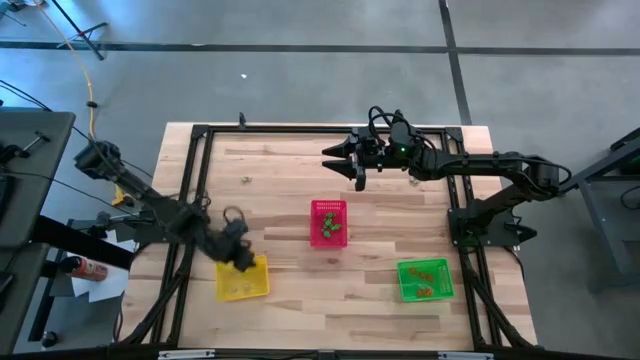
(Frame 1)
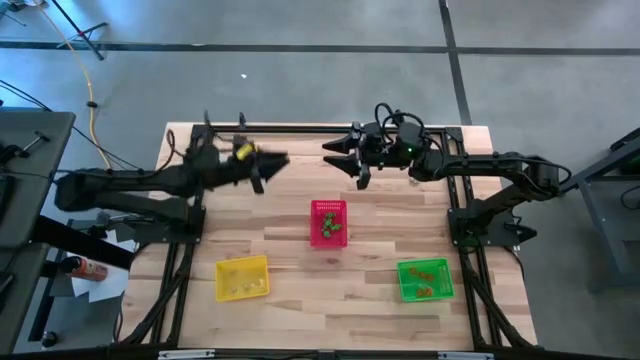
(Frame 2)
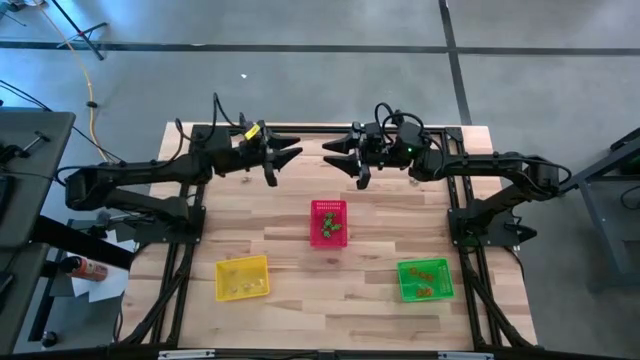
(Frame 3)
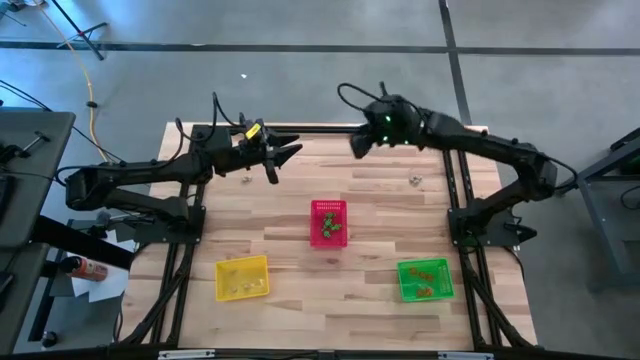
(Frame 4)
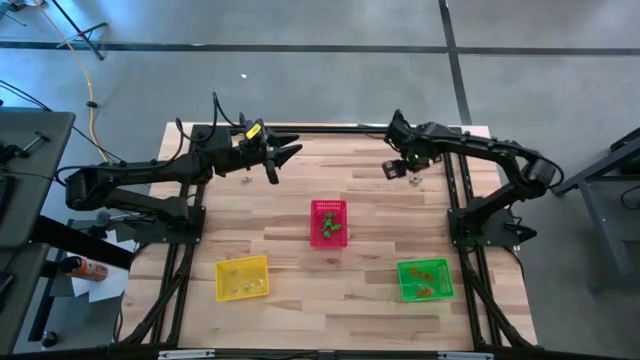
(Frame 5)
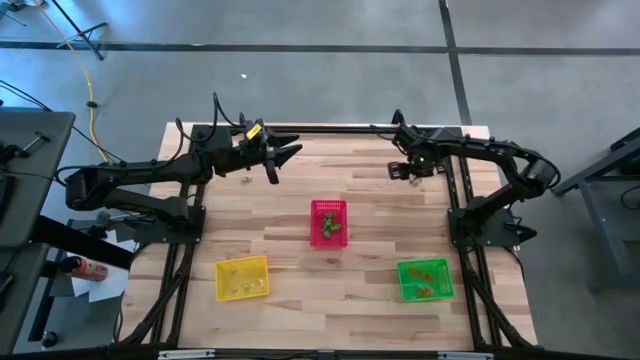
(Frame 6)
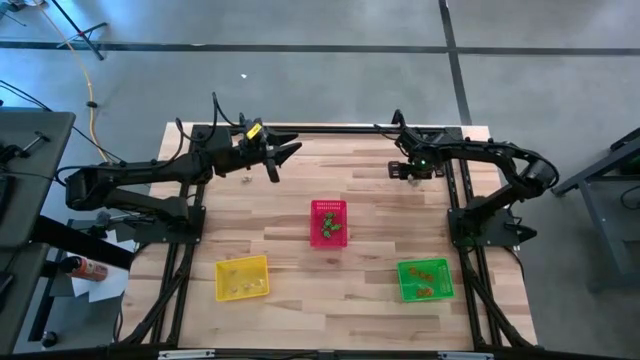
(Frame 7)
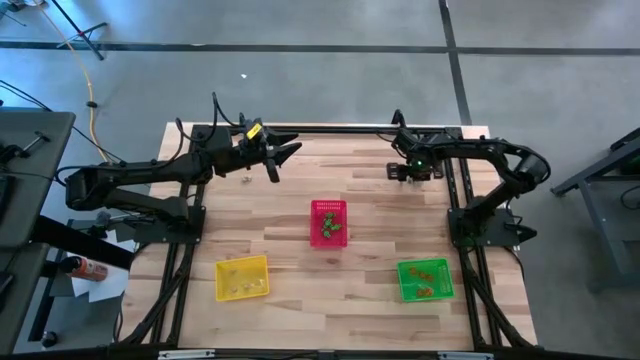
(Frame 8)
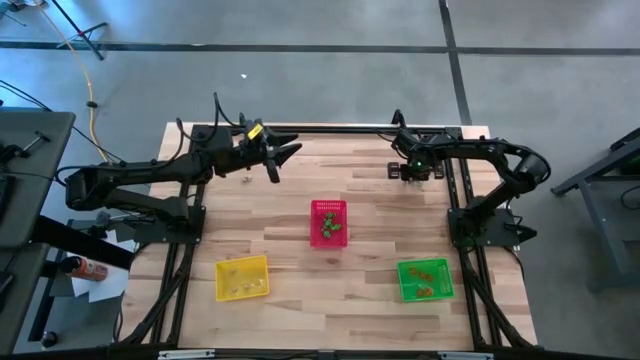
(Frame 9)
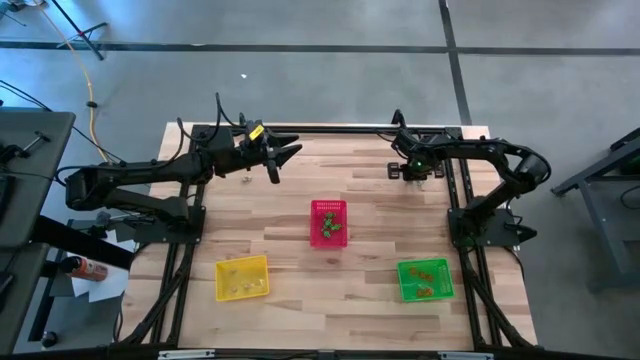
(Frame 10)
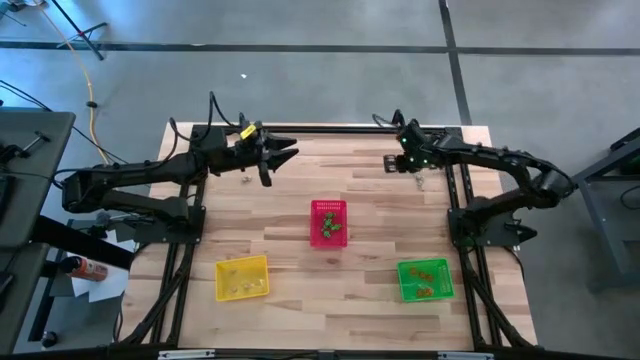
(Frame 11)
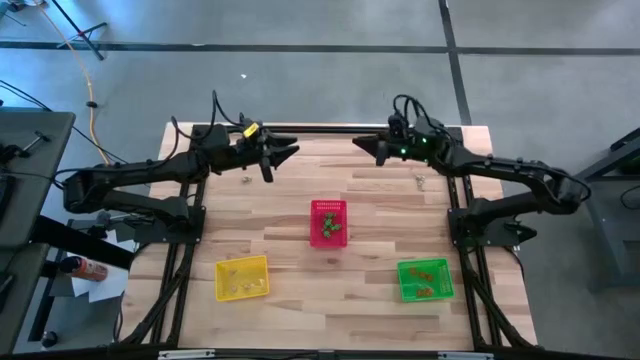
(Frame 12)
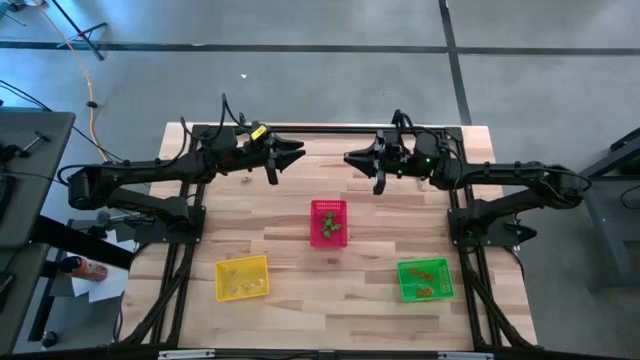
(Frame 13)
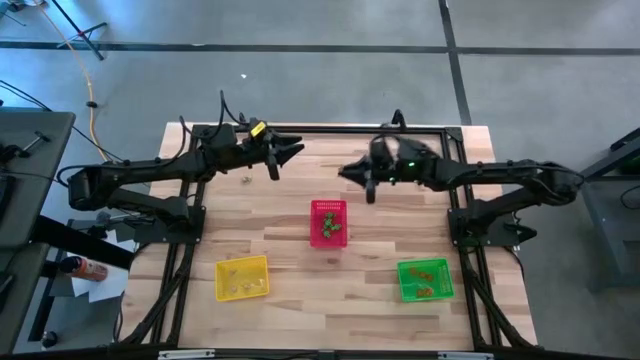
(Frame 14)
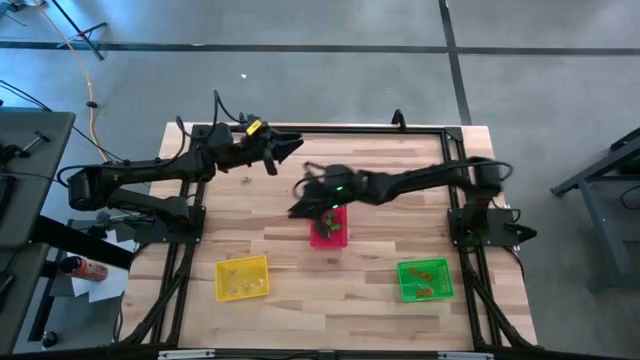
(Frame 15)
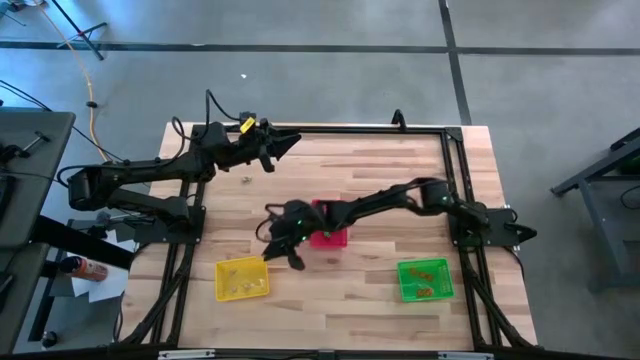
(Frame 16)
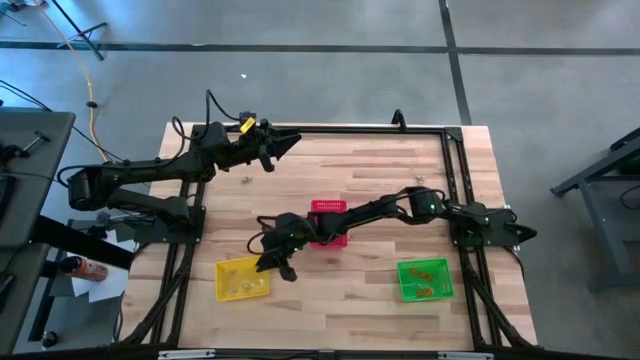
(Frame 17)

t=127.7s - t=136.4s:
Task: Sort Halloween decoration
Put the white skull toy into the yellow bin

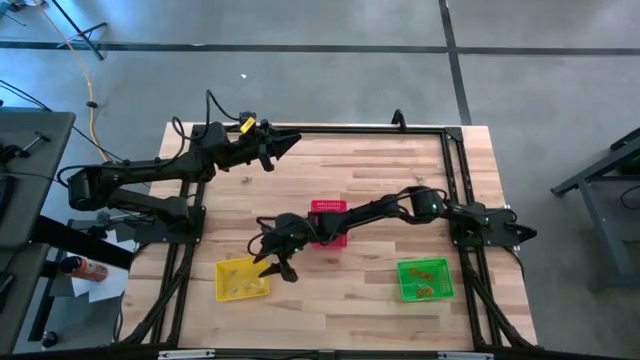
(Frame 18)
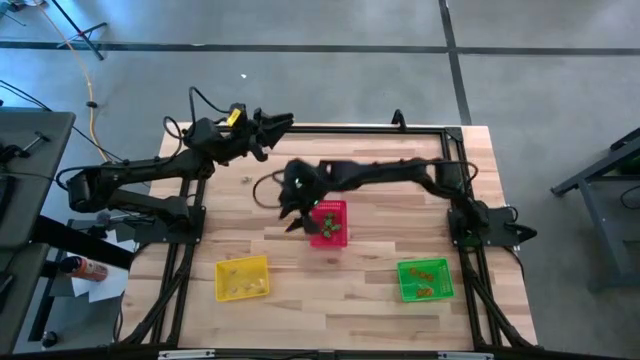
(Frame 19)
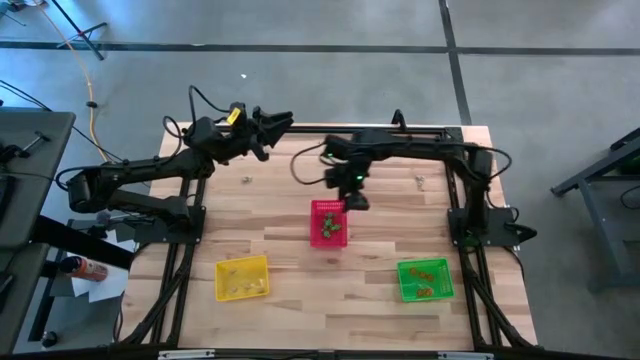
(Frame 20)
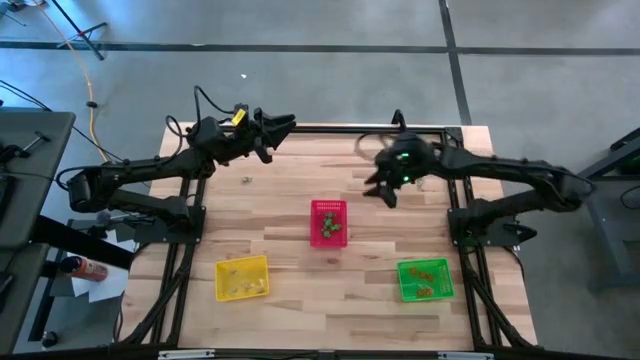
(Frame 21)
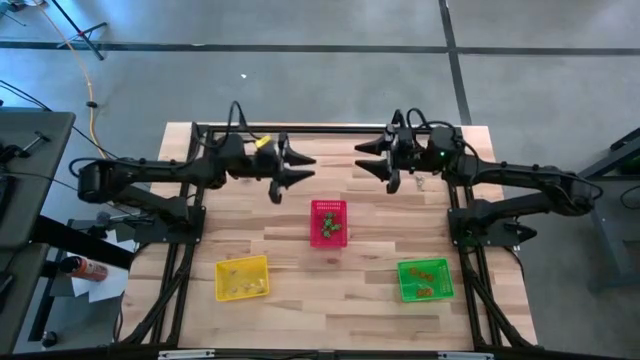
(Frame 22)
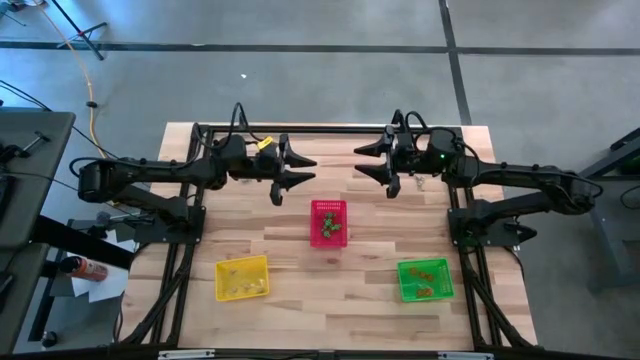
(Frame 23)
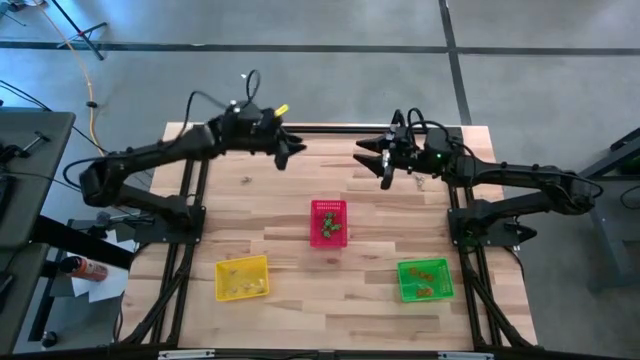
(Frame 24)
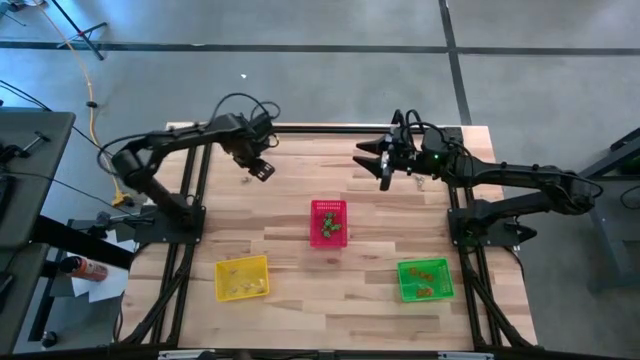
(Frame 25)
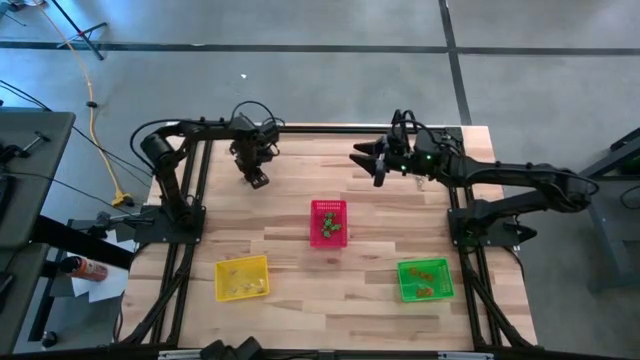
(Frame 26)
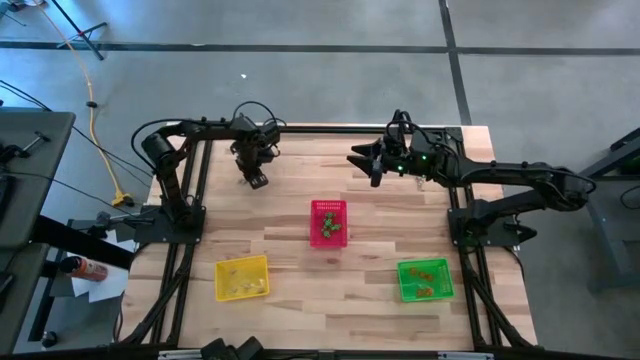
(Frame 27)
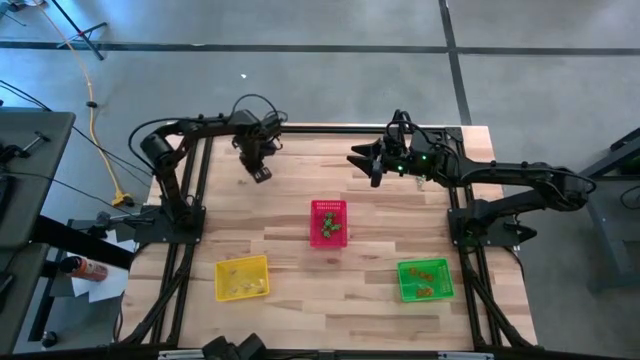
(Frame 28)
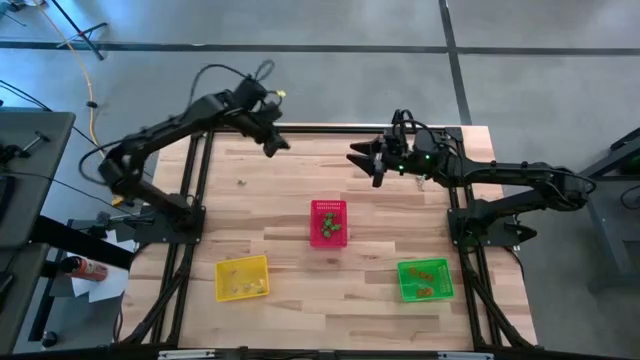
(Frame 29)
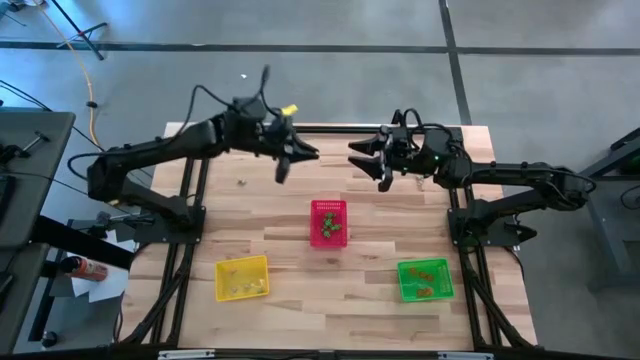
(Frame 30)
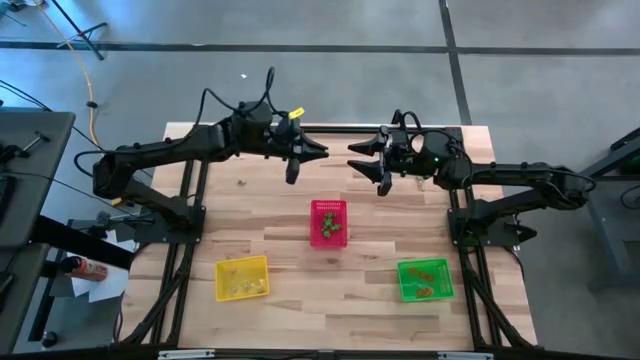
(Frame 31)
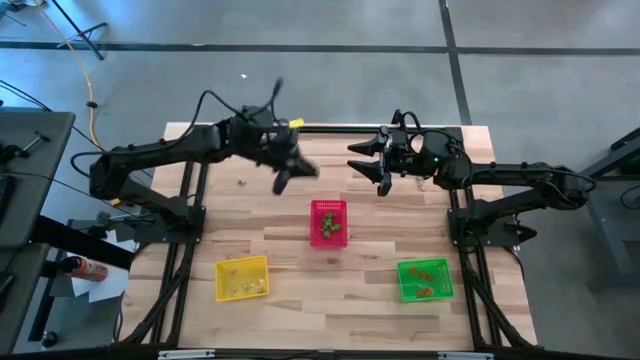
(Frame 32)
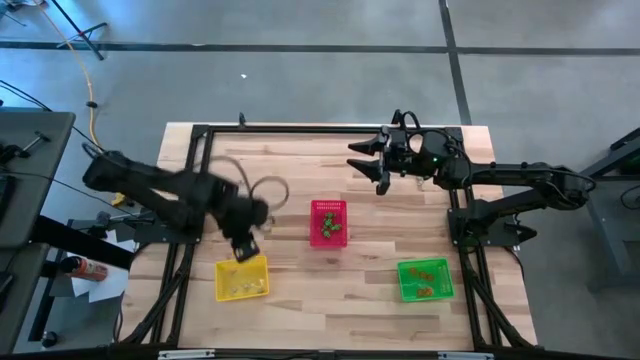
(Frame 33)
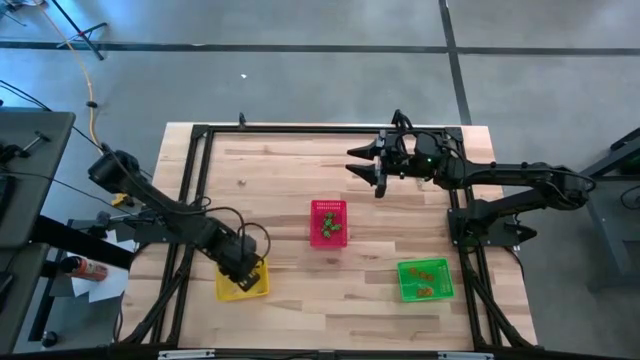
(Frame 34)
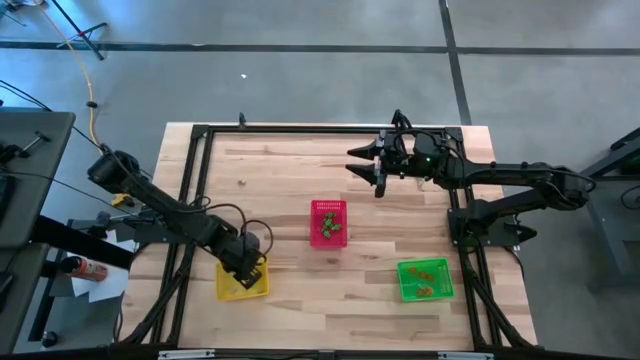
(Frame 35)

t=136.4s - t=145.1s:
Put the white skull toy into the yellow bin

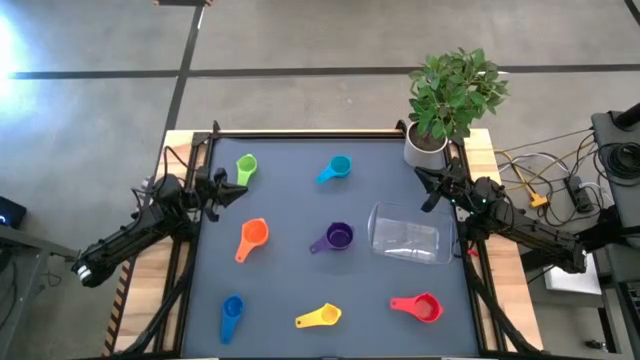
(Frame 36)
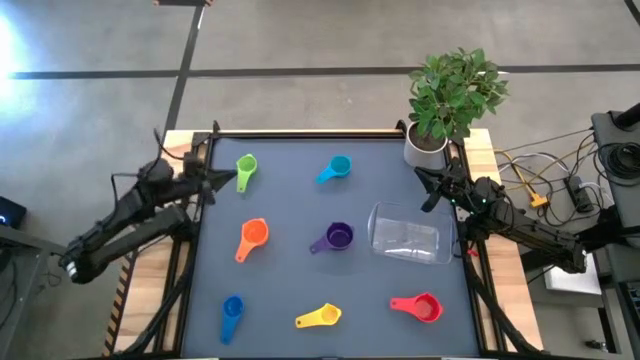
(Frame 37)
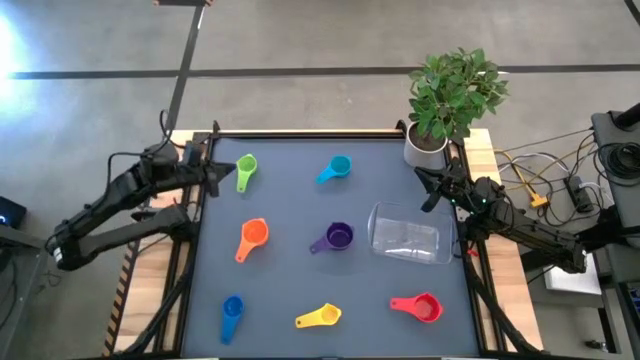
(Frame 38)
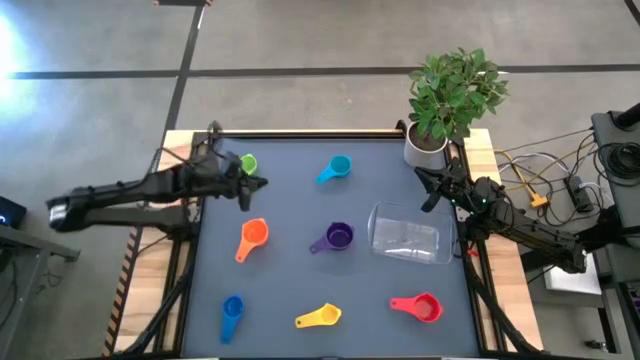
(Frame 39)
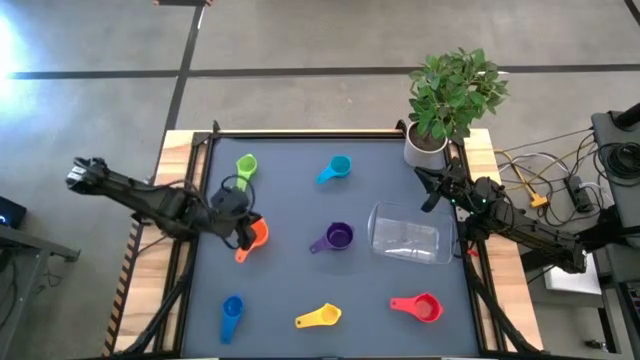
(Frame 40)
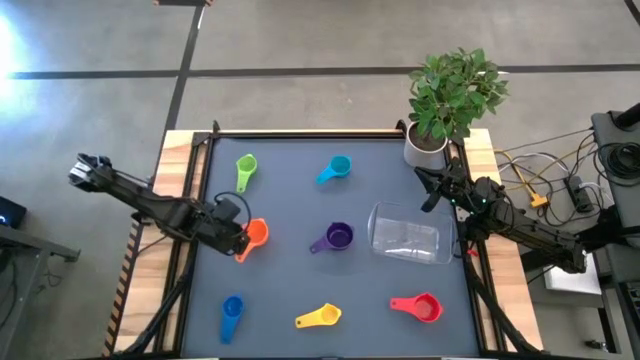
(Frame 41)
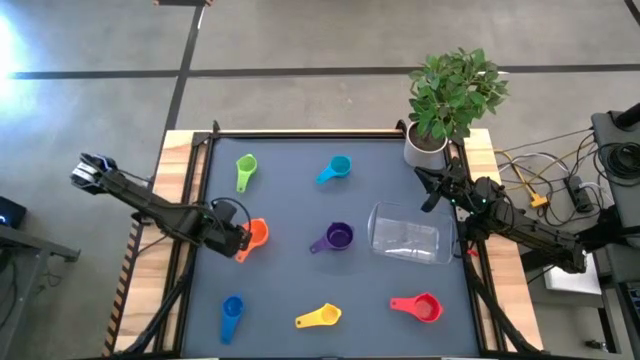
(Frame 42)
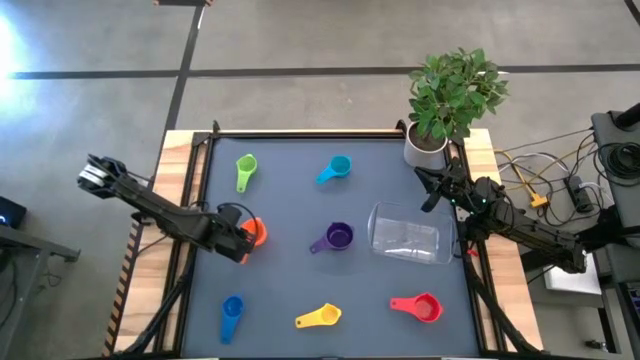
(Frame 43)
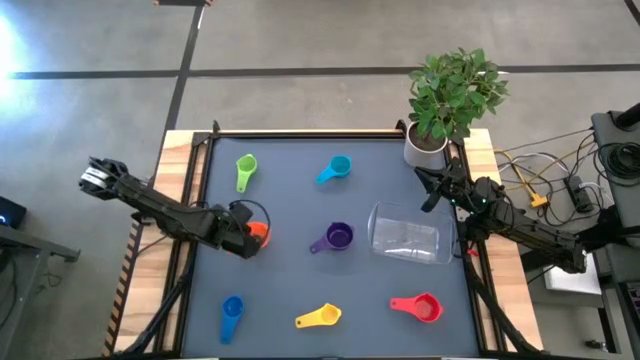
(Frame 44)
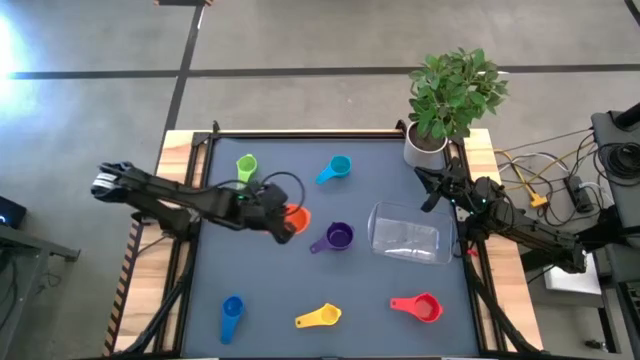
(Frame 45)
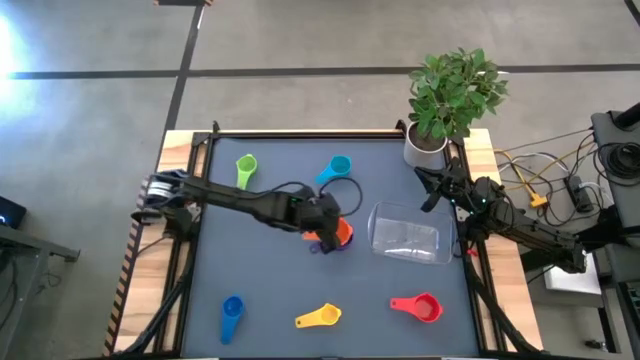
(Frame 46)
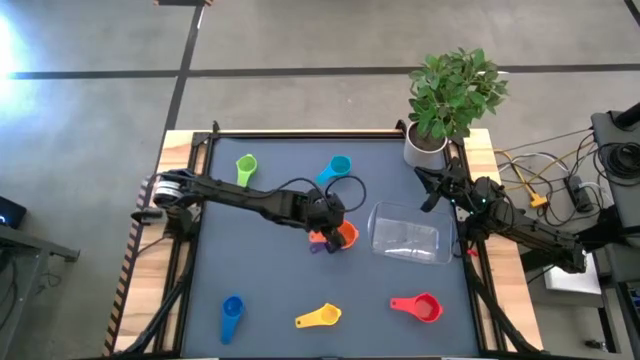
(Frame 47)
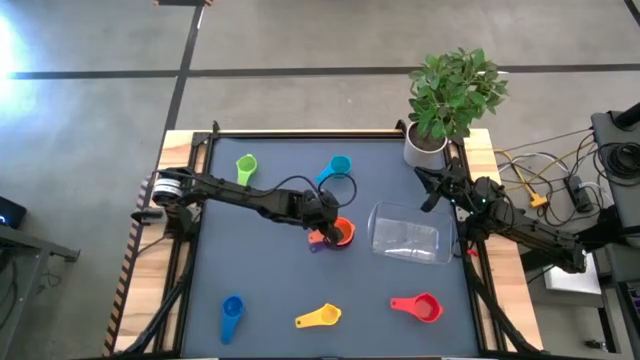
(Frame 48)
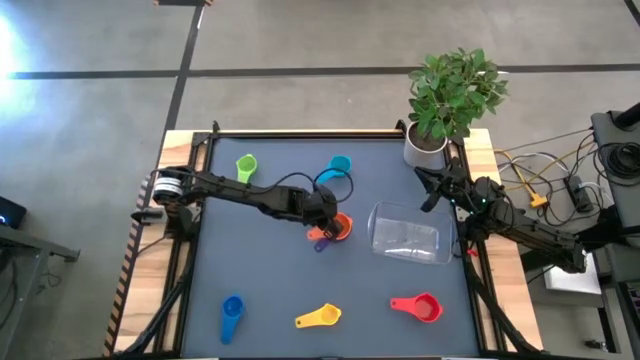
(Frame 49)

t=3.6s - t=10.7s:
Task: Nest measuring cups in basket
Stack the orange measuring cup on the violet measuring cup
